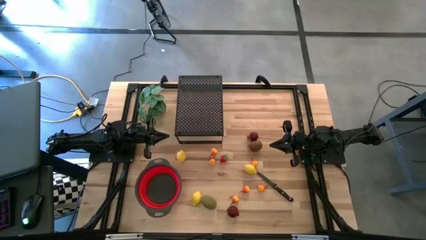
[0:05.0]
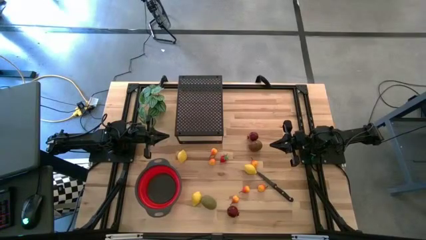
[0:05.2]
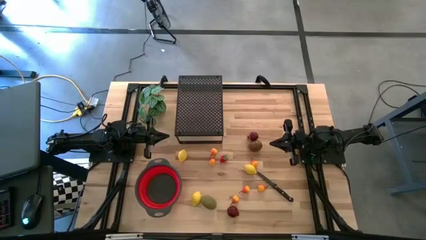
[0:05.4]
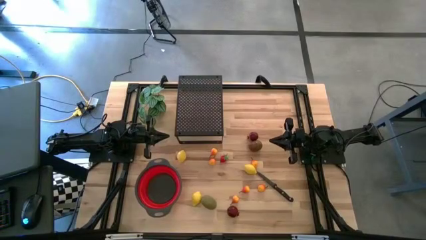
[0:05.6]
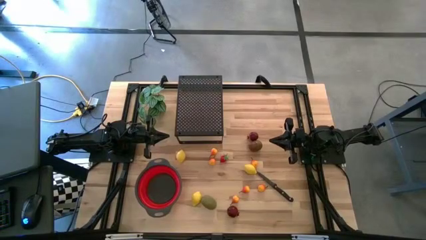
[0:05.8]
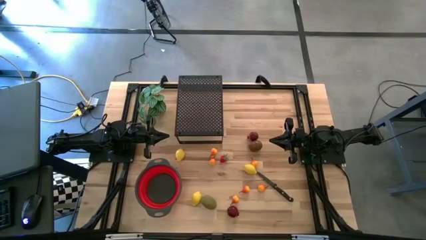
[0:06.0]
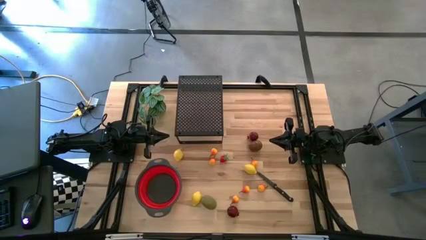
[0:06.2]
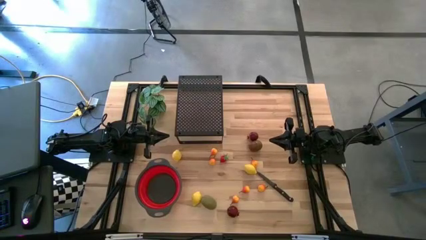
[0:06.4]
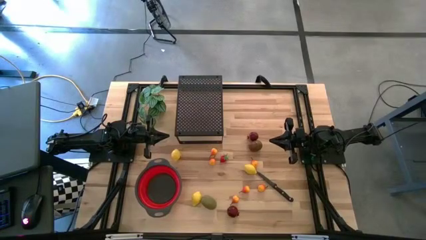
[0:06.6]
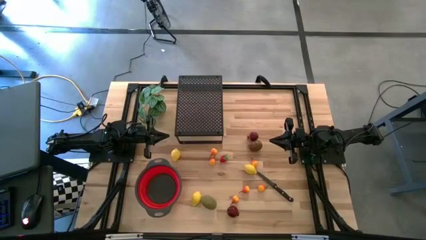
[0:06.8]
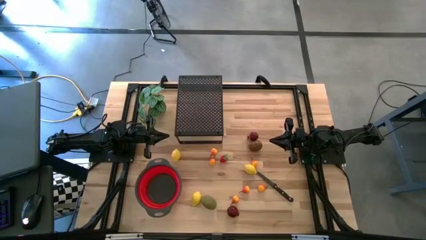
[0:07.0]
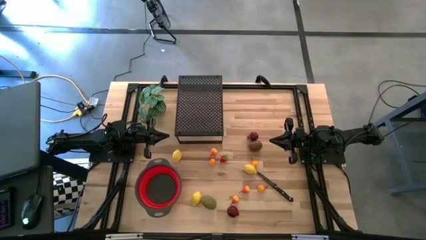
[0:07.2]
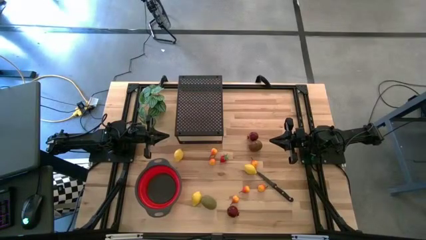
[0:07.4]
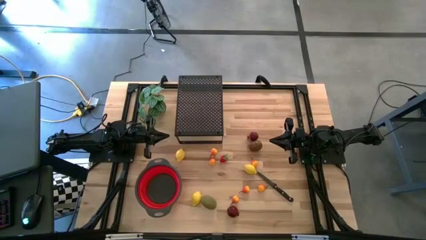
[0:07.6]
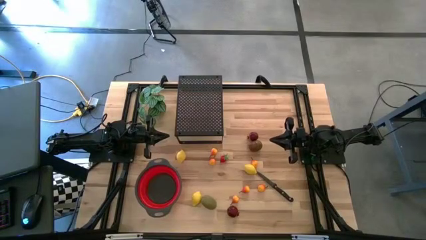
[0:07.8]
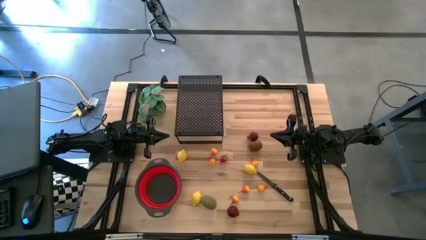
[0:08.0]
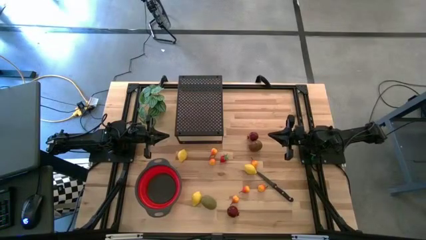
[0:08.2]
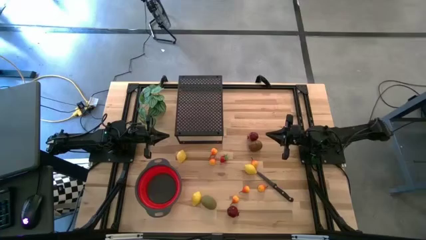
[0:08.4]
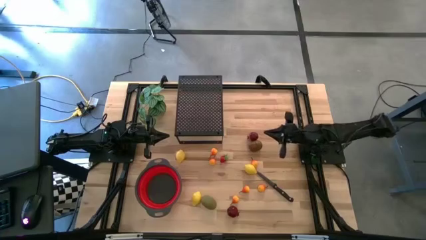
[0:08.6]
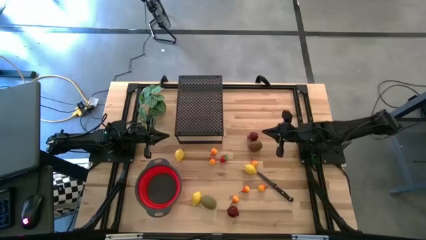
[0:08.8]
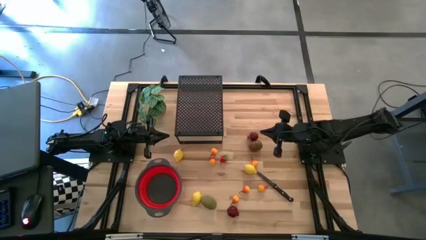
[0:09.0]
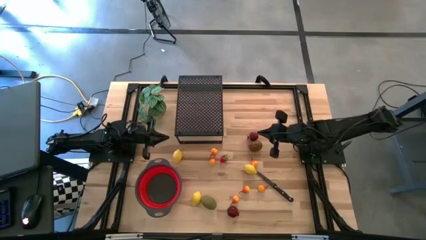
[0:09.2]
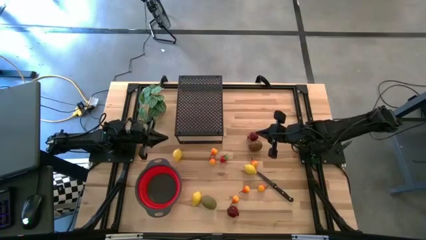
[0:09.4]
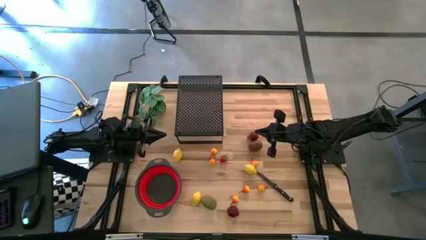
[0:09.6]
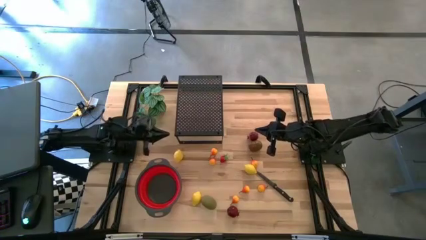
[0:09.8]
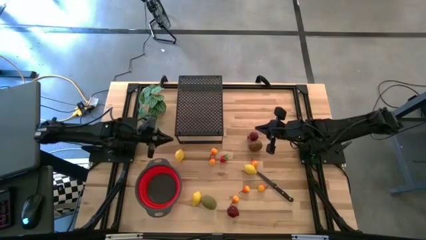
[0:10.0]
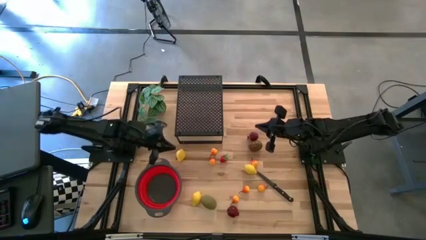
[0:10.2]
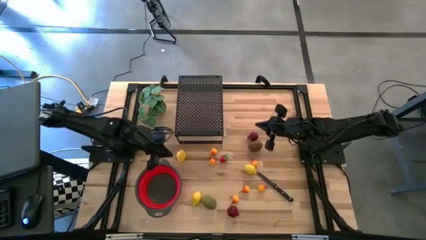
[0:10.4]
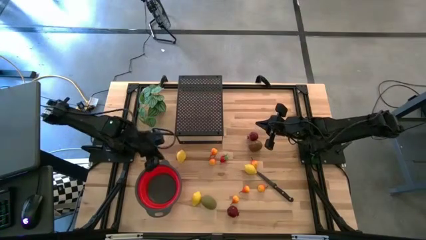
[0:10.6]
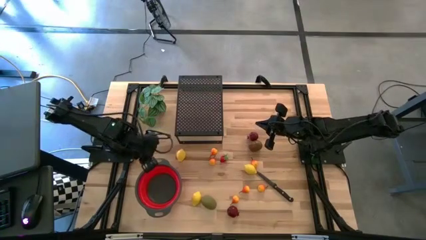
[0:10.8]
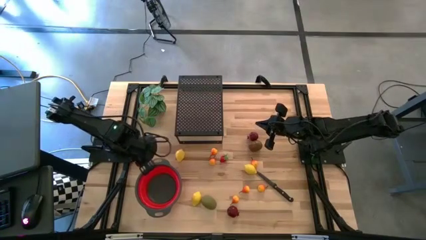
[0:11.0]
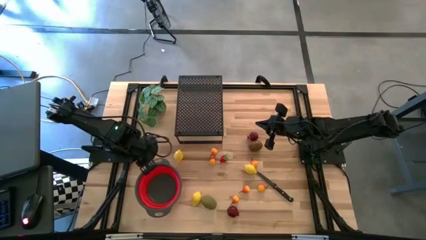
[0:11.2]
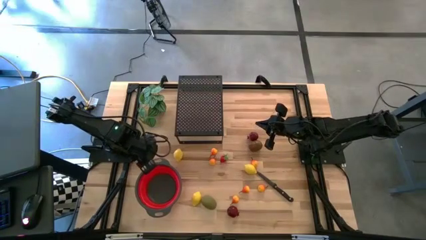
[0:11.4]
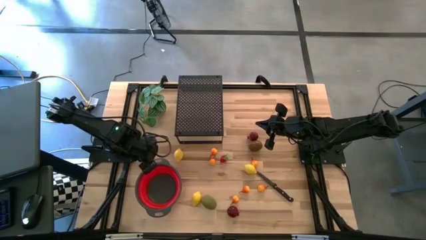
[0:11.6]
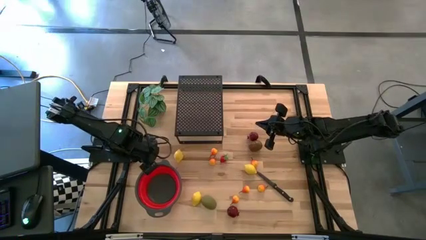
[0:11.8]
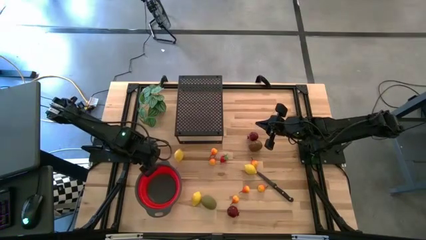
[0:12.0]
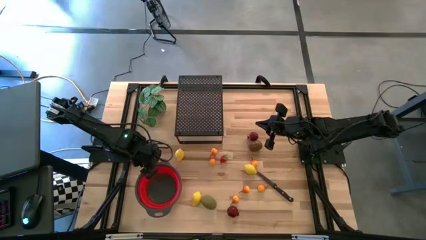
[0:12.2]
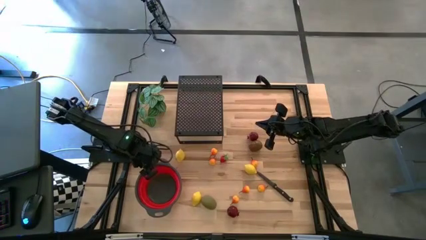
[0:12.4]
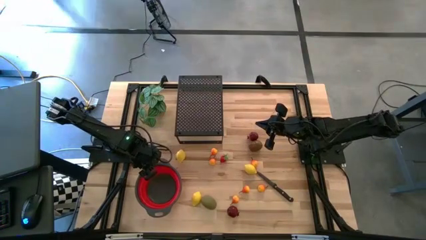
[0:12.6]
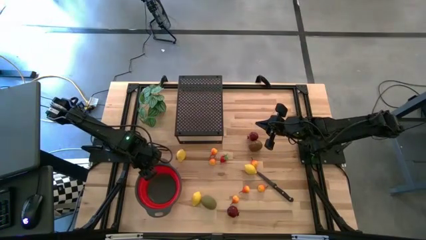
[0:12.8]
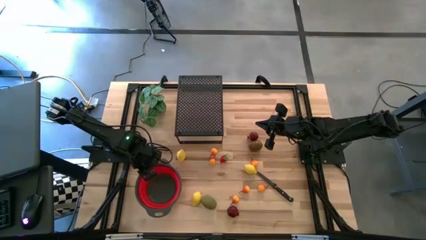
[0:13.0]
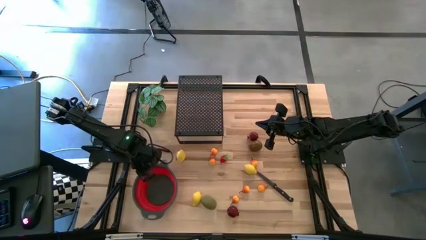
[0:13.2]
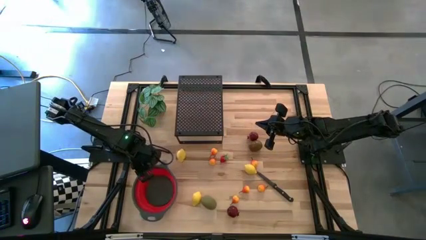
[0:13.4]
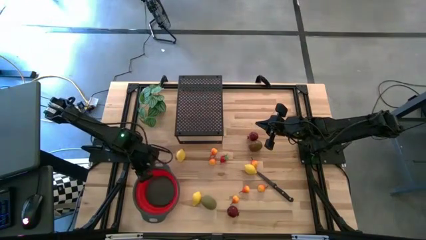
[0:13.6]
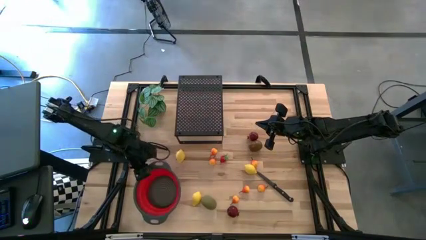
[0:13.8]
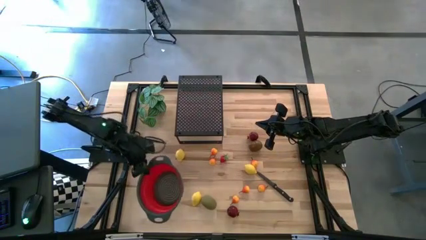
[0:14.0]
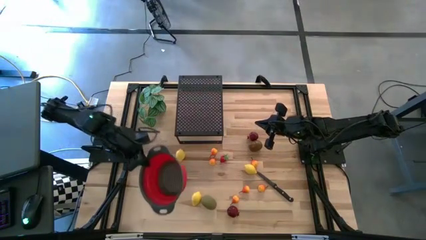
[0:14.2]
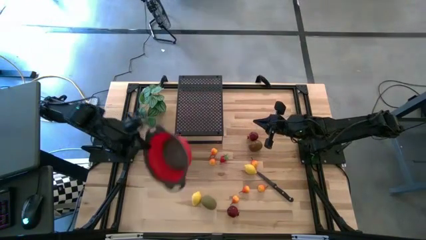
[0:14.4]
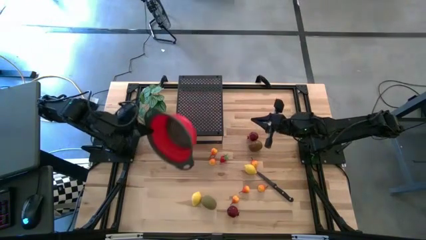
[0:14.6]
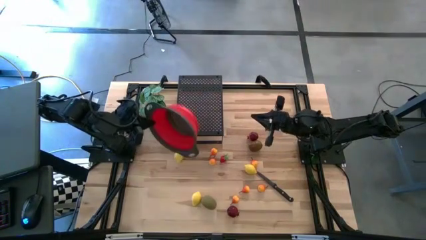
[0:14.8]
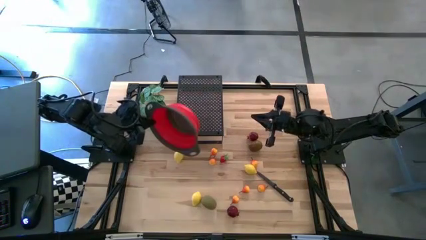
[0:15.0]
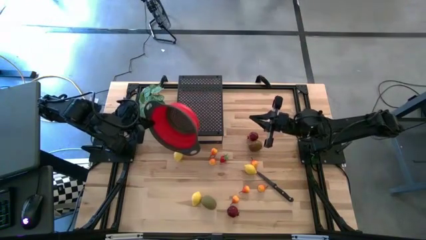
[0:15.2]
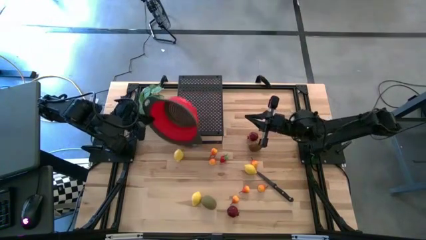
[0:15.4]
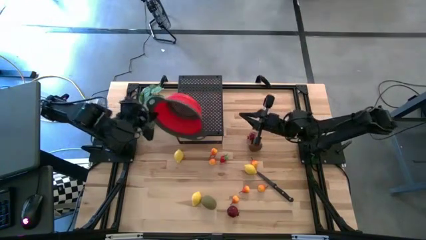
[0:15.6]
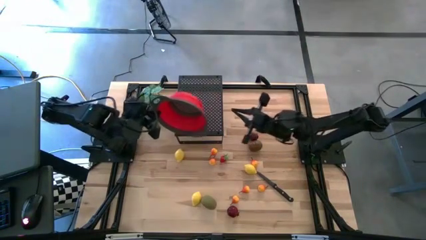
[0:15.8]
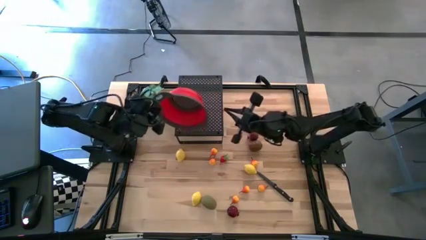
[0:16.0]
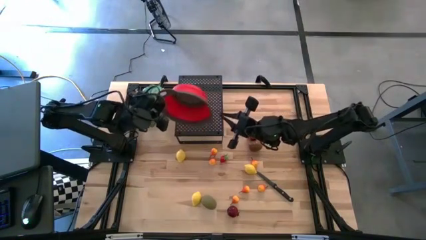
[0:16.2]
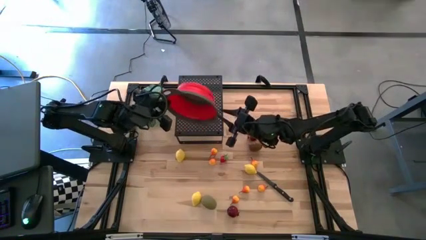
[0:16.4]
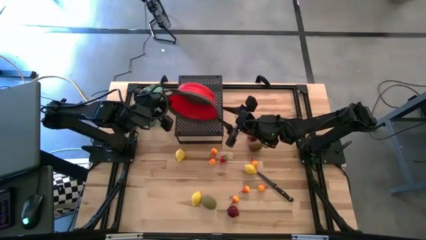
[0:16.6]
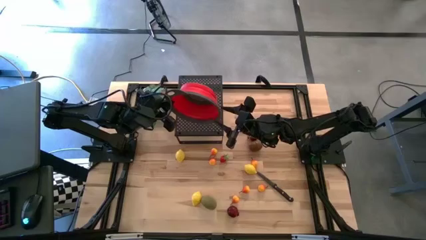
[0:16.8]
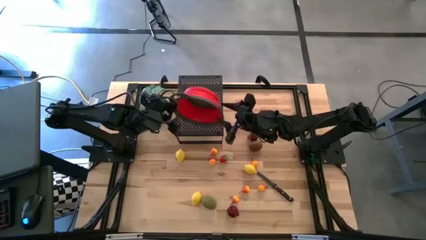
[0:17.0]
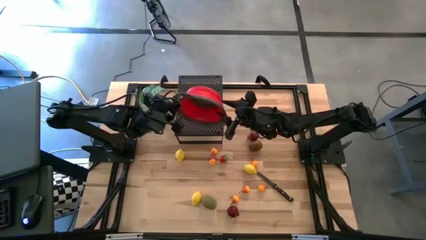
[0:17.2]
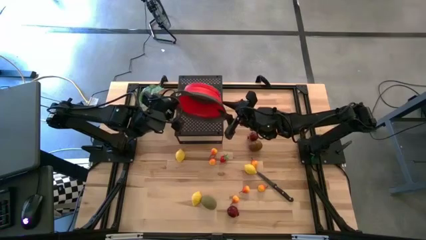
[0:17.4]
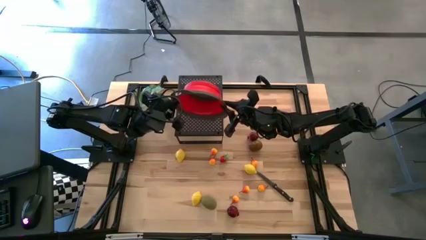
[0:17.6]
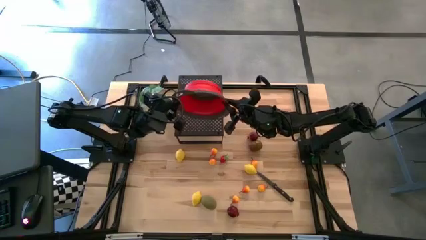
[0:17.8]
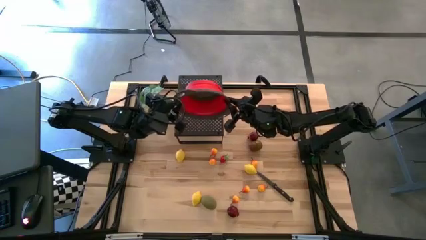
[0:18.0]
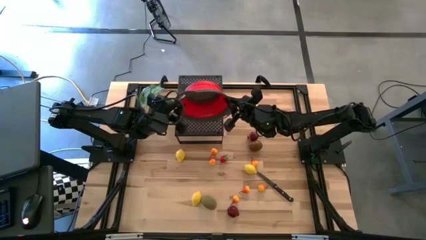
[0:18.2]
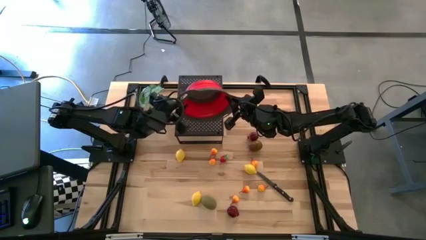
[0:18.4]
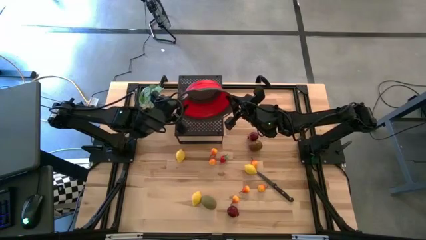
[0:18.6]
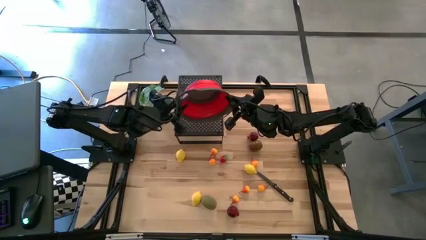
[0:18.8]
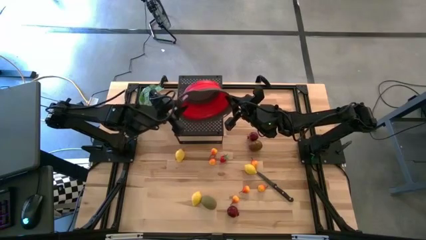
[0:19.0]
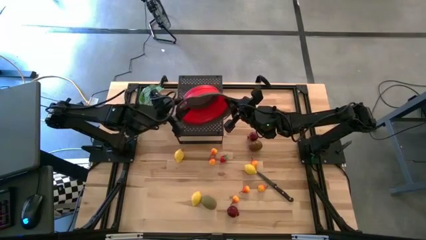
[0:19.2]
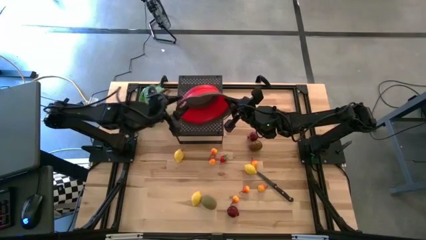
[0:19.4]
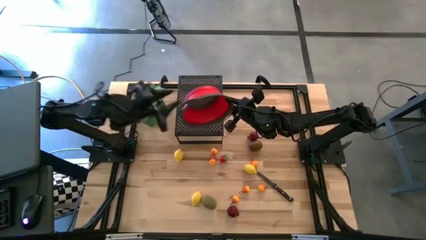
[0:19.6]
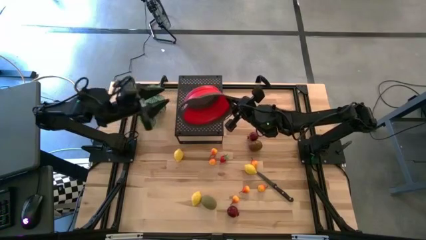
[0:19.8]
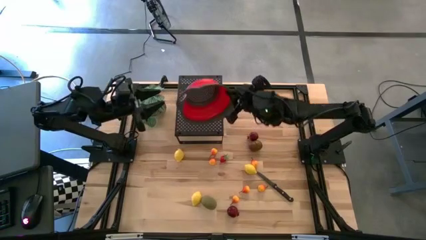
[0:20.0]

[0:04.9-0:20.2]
Task: Pick & Place Fruit
Put the red strainer bowl on the shelf
